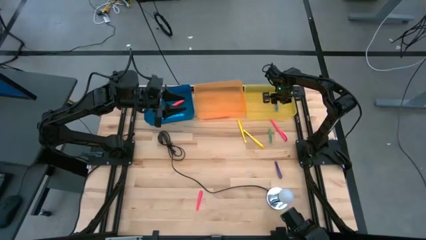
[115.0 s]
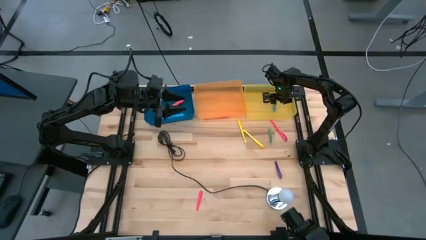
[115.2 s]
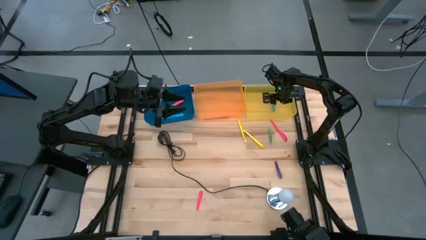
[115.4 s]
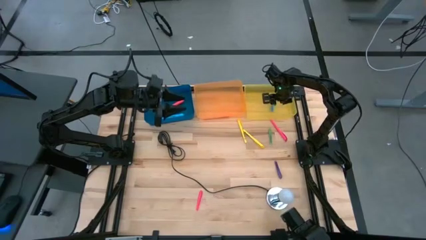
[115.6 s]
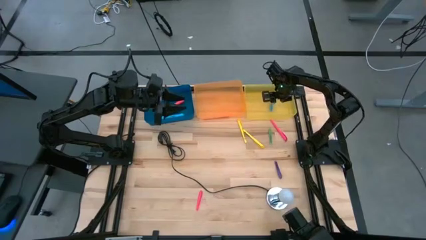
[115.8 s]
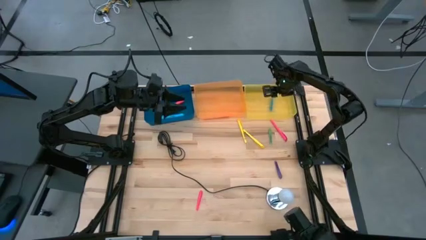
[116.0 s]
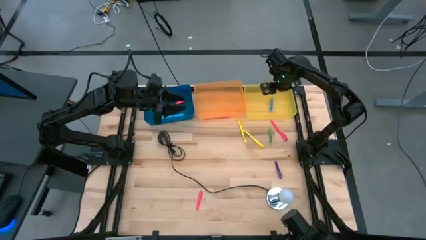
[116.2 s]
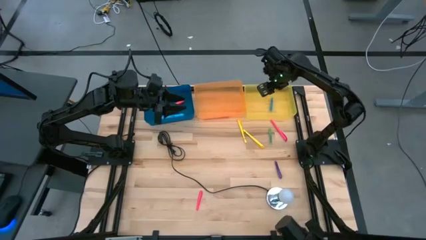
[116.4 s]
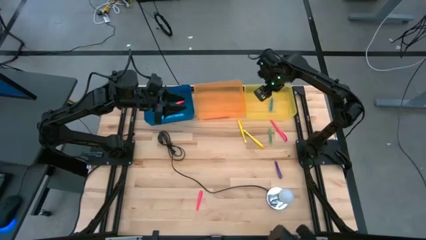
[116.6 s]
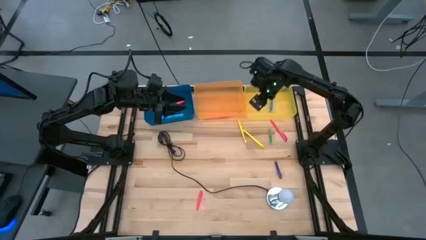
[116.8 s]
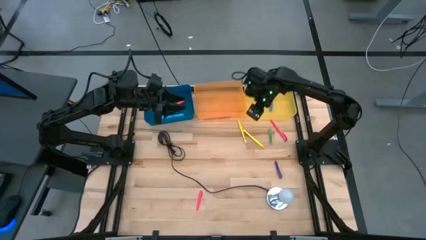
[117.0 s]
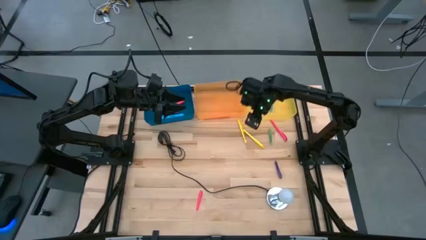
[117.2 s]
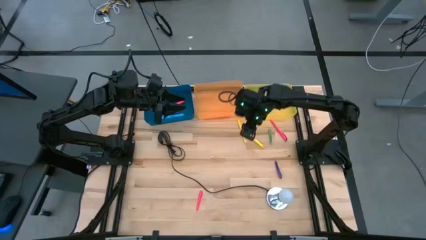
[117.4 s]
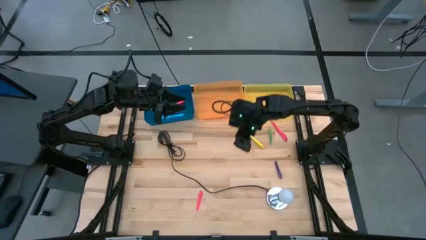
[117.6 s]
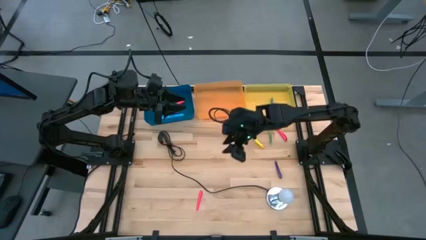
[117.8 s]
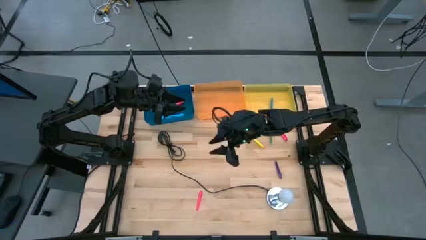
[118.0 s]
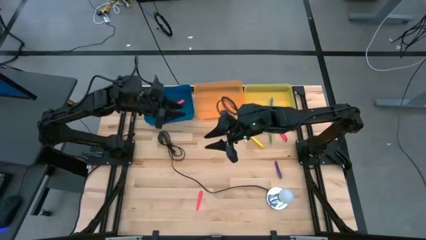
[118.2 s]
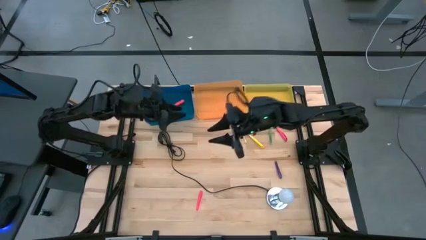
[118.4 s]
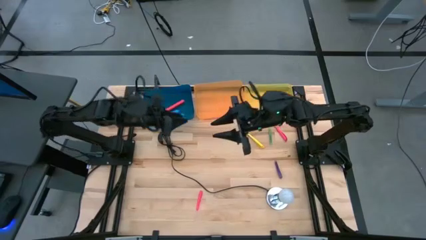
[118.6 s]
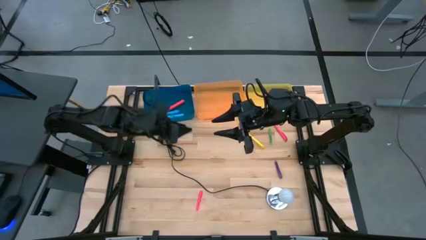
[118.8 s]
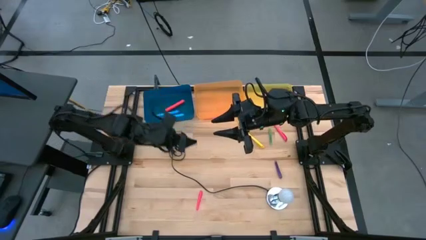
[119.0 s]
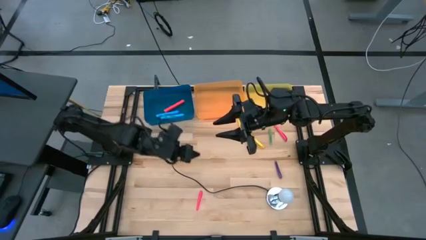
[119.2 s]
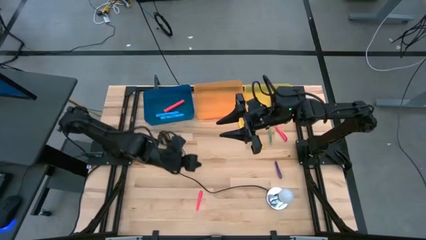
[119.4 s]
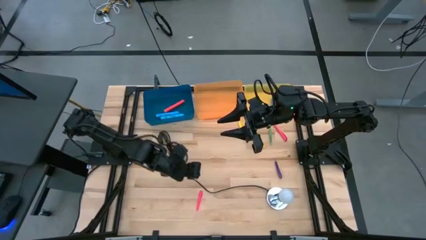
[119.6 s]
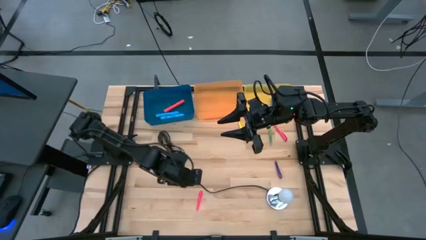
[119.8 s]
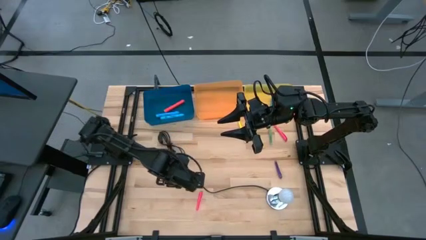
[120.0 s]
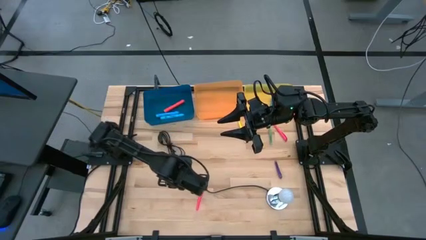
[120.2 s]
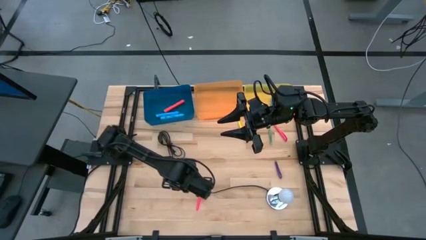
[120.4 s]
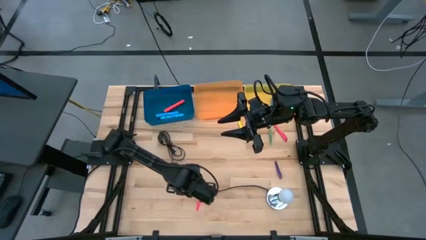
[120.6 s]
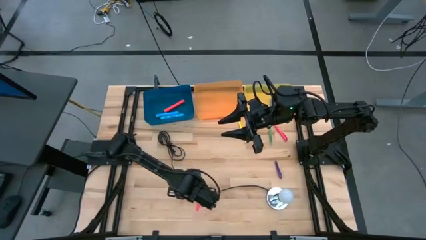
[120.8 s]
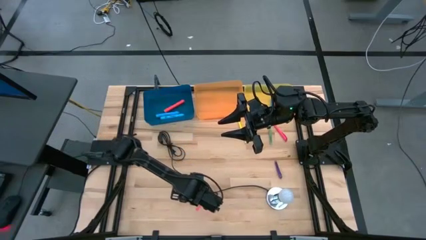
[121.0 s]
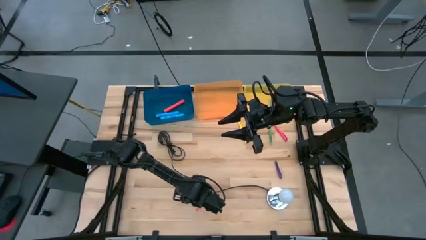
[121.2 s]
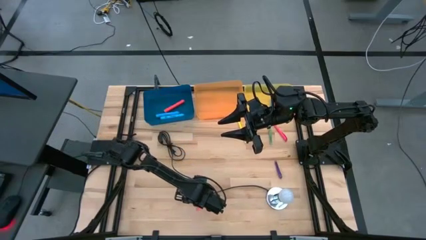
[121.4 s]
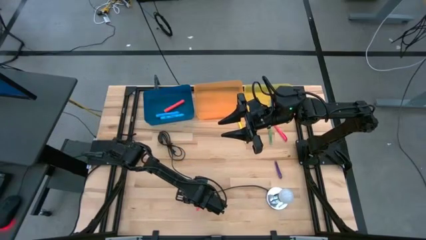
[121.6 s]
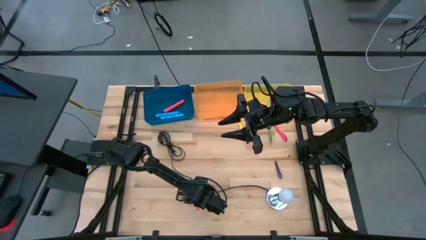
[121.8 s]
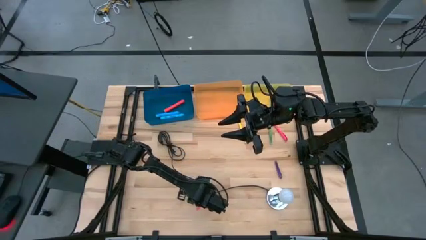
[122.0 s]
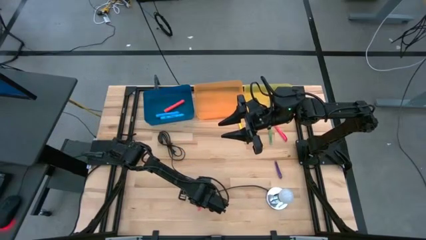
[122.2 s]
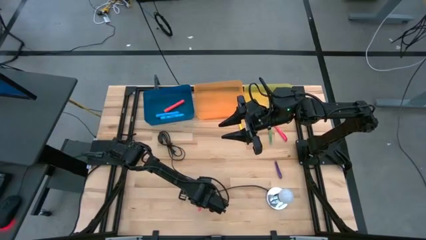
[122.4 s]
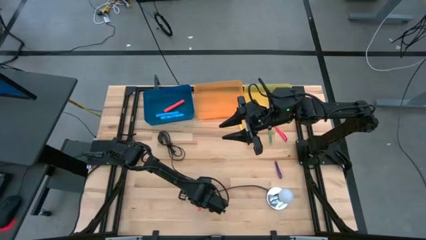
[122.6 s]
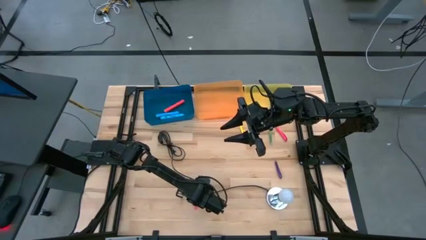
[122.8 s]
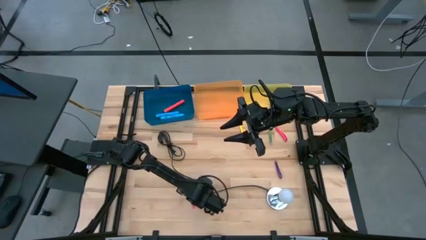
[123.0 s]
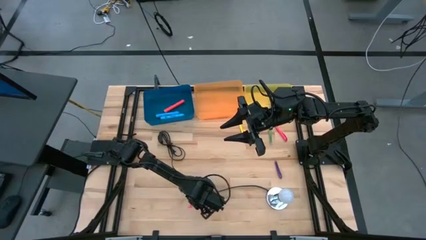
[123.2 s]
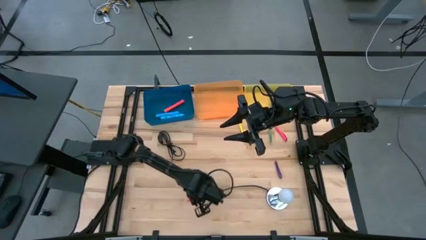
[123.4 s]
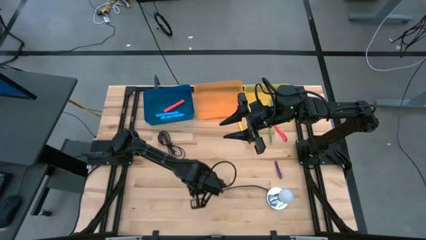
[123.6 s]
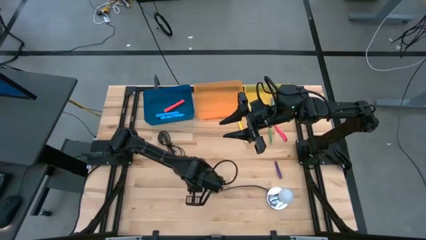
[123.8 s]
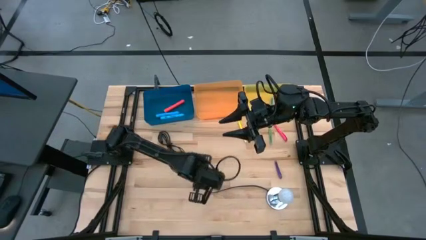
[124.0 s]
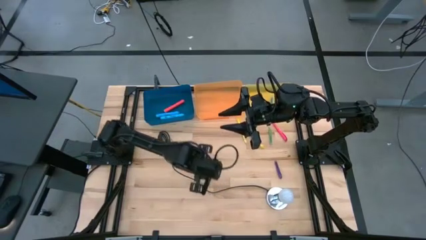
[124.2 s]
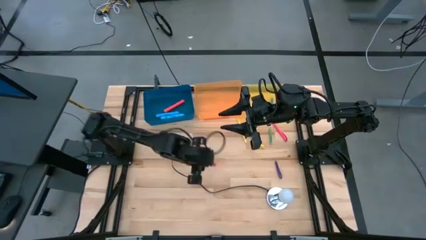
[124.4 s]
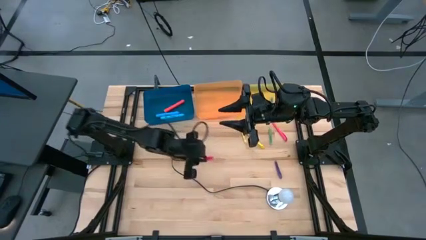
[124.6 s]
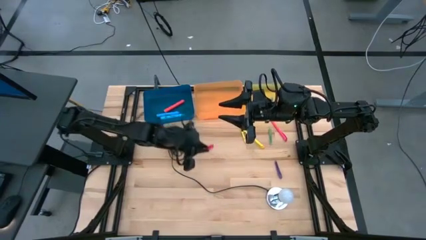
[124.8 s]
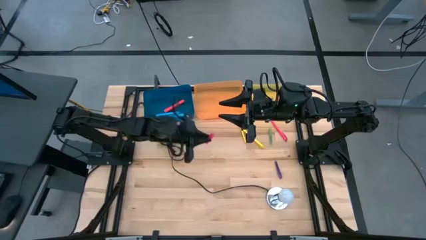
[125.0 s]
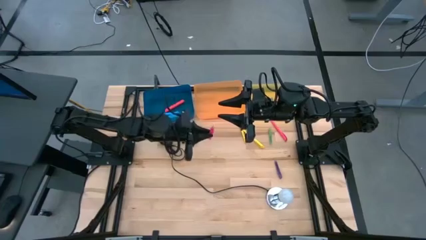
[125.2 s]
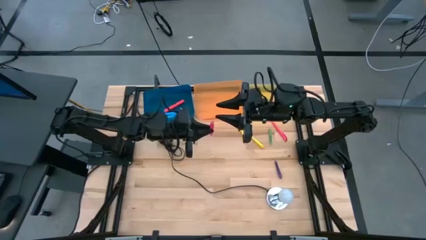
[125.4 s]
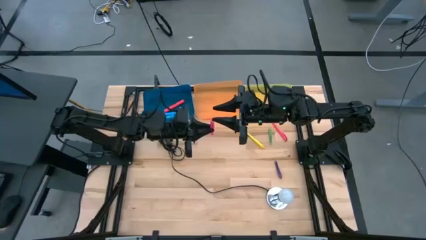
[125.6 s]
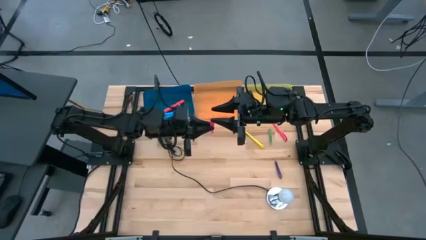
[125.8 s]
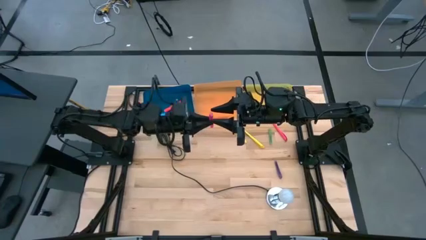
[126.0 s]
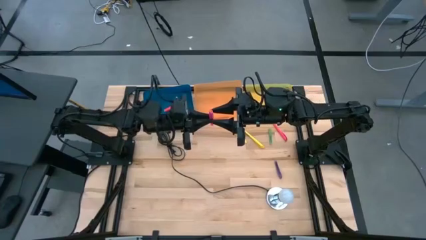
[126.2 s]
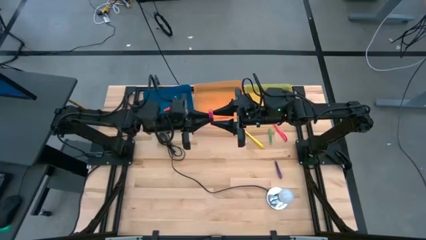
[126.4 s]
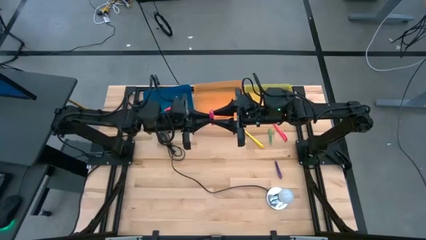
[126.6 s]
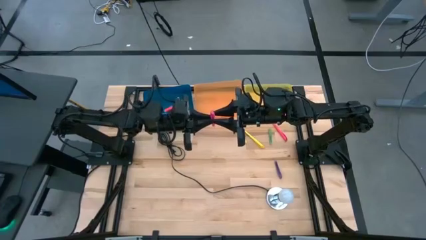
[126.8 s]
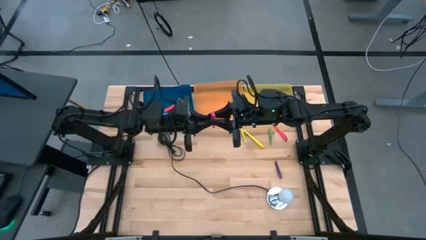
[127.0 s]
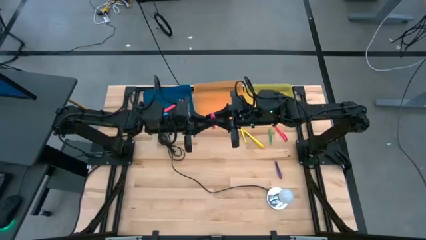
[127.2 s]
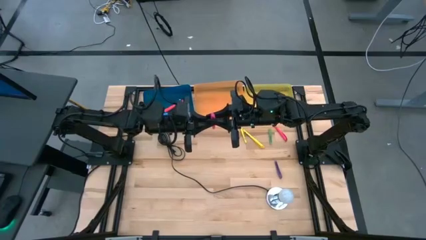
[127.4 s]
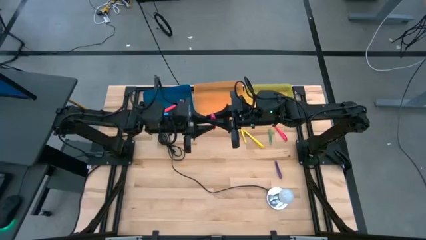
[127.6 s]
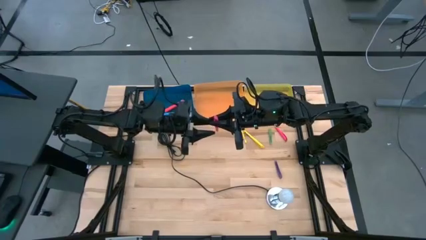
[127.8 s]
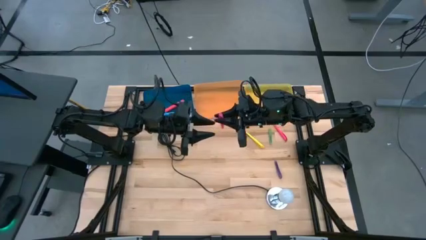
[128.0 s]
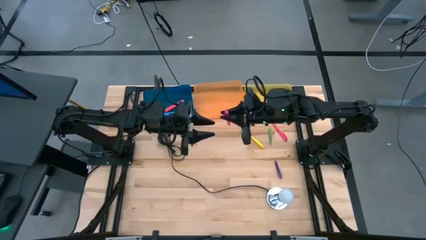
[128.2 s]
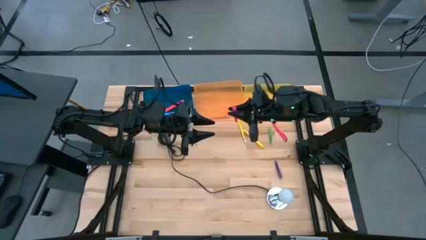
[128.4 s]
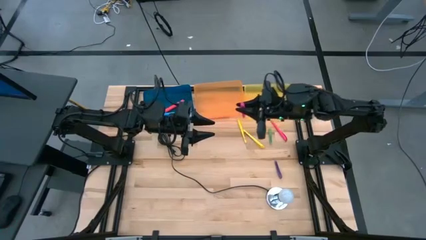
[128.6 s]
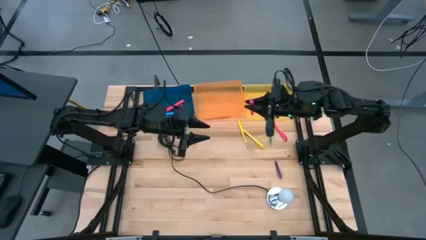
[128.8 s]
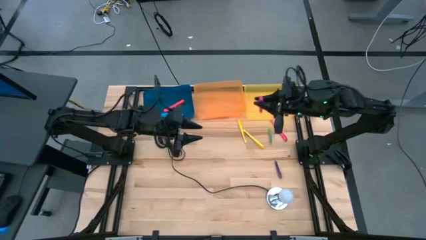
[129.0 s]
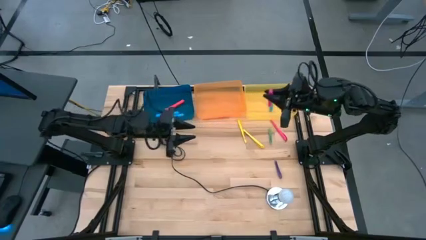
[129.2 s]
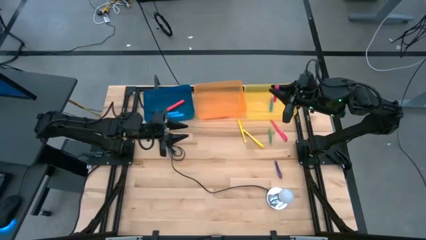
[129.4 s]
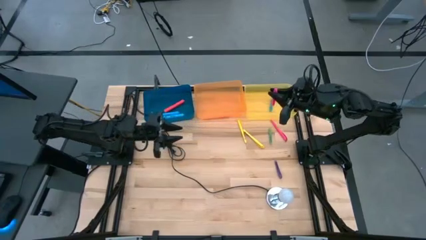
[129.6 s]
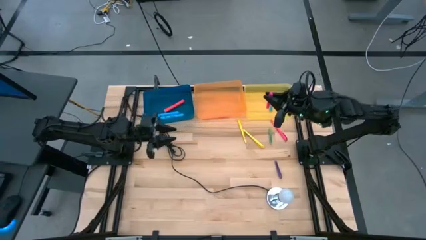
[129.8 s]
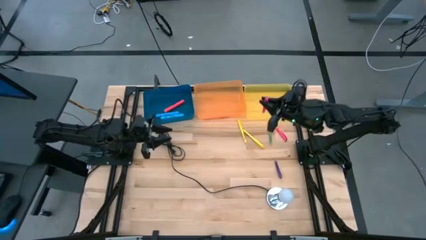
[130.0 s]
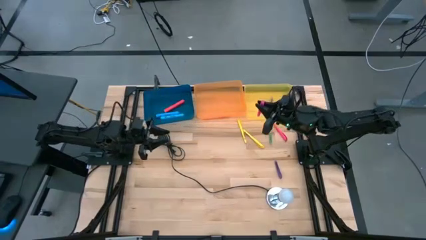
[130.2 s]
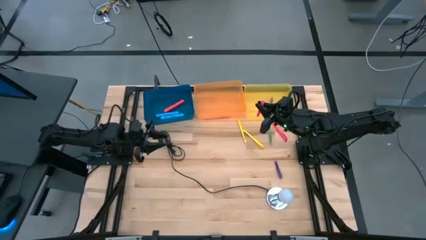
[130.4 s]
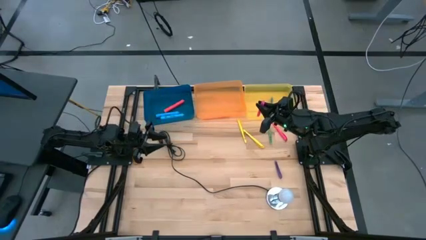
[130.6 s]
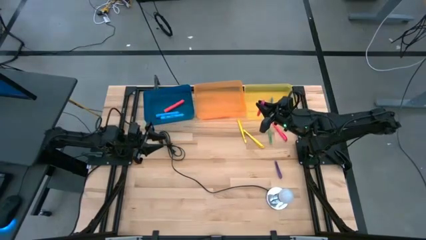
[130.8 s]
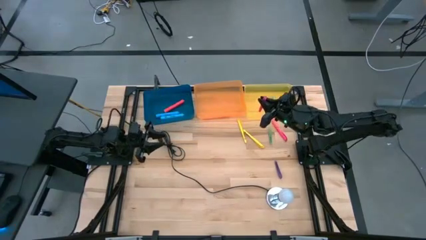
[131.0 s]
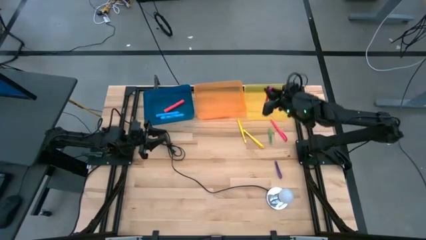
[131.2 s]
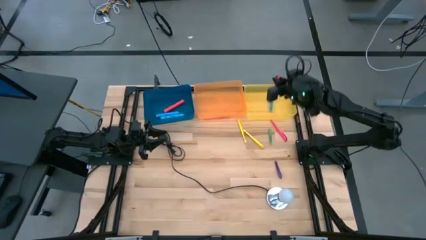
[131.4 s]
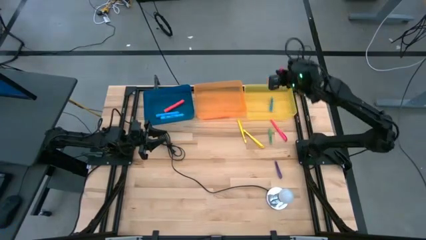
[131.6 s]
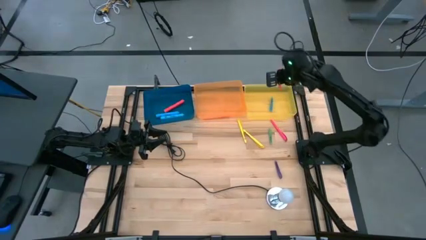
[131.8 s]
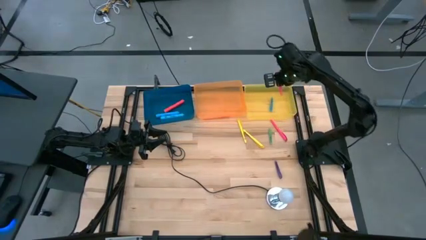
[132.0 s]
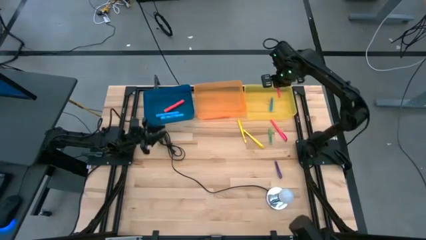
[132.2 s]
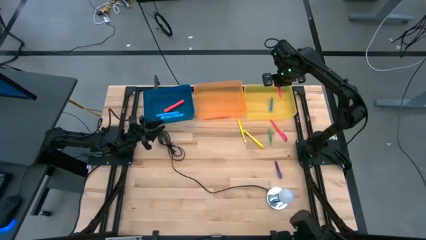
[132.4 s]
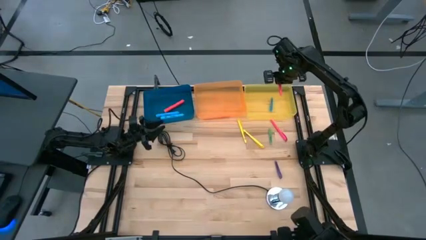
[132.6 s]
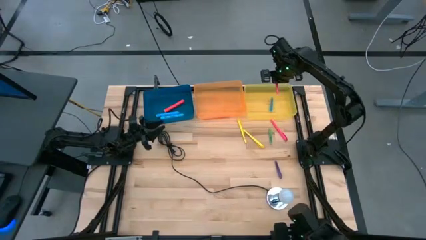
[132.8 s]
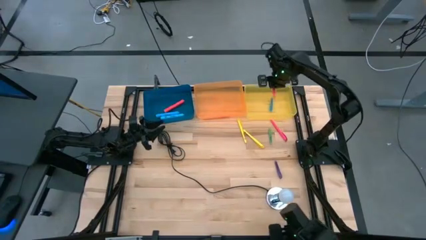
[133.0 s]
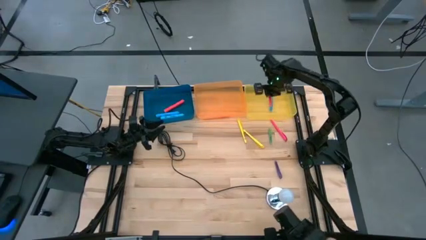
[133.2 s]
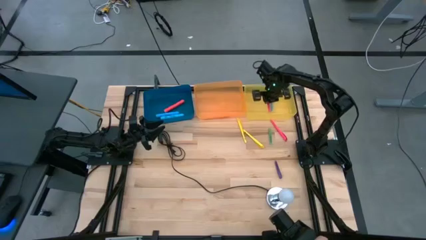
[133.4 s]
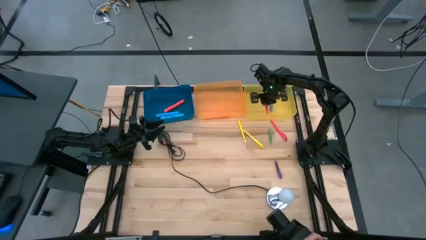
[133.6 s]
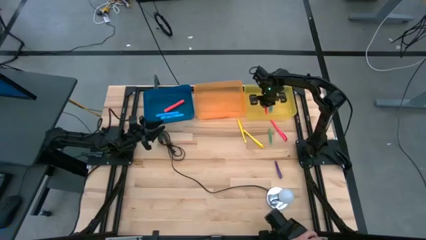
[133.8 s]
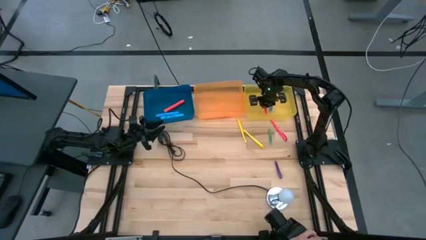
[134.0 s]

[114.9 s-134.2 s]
Task: Pick & Place Markers
Put the small pink pen into the yellow bin
